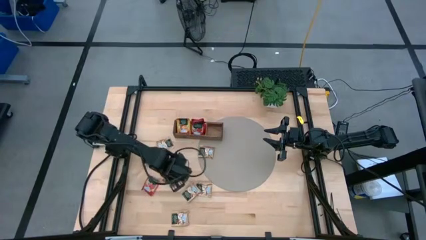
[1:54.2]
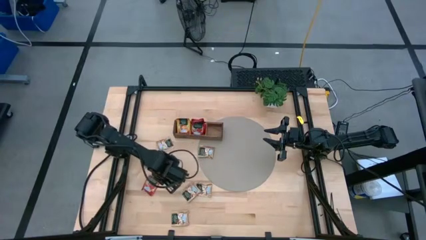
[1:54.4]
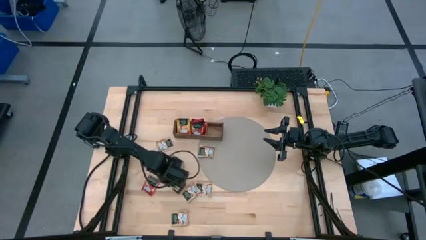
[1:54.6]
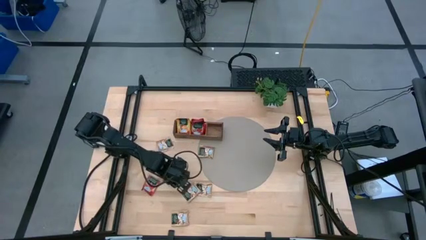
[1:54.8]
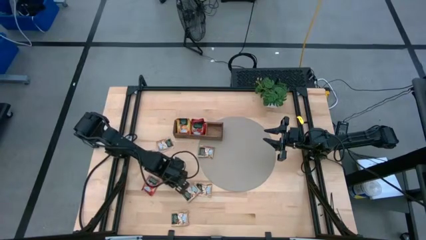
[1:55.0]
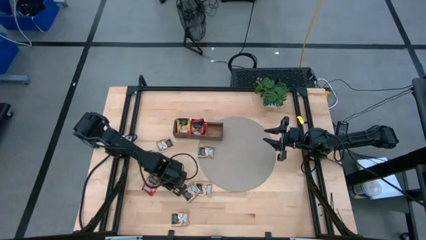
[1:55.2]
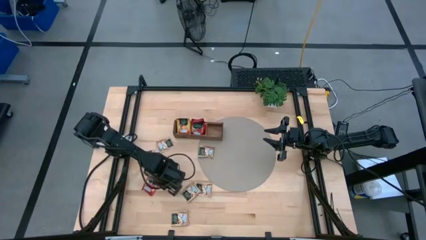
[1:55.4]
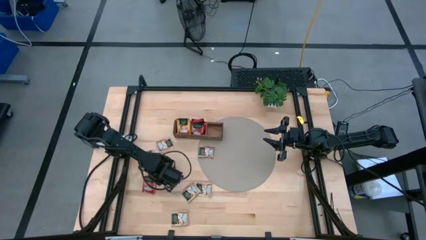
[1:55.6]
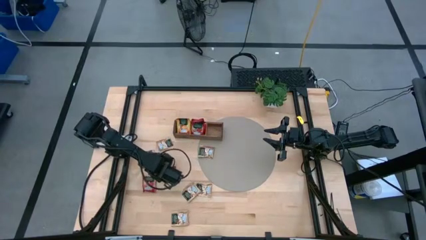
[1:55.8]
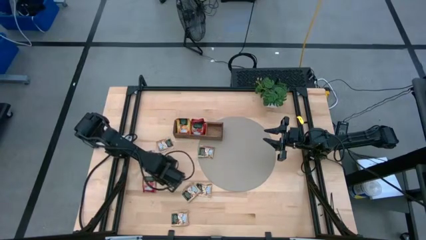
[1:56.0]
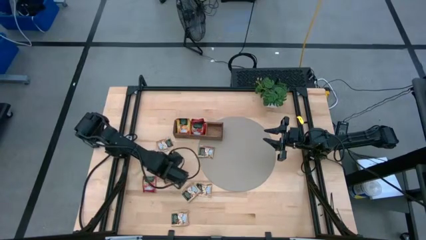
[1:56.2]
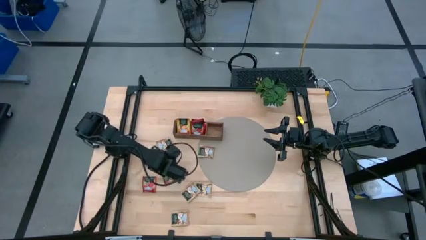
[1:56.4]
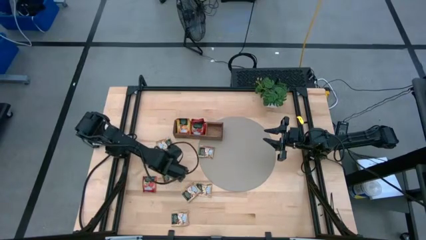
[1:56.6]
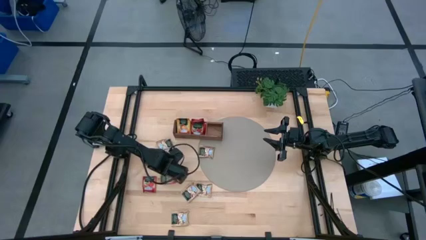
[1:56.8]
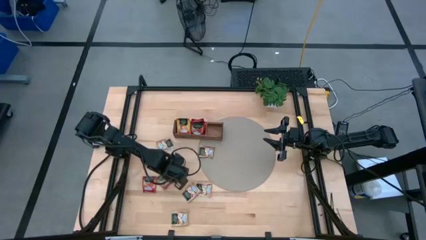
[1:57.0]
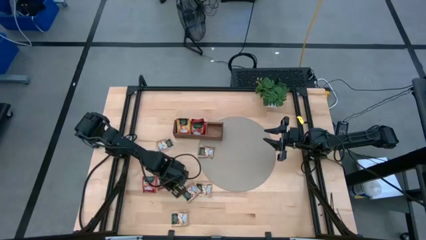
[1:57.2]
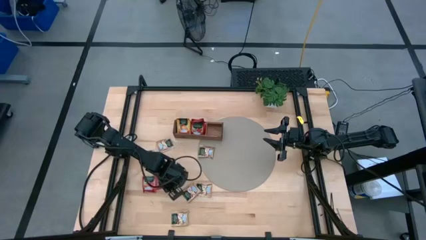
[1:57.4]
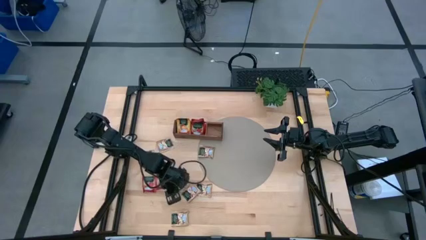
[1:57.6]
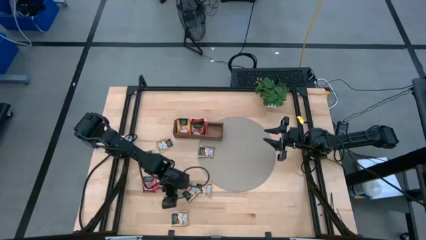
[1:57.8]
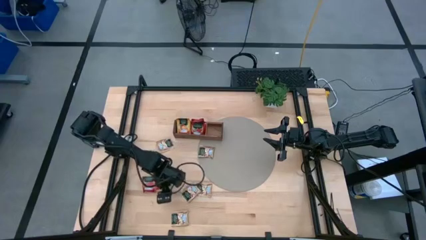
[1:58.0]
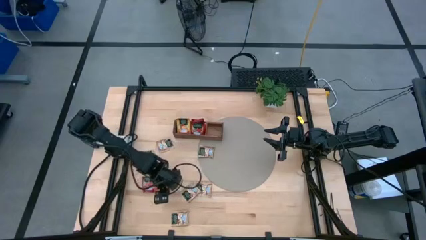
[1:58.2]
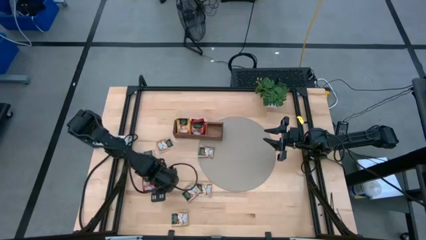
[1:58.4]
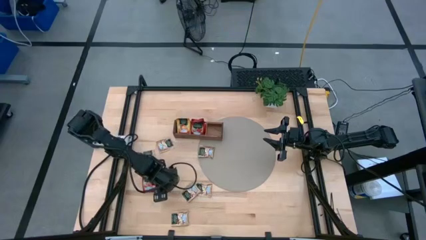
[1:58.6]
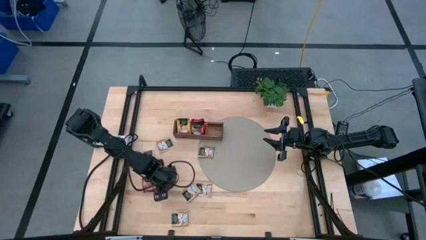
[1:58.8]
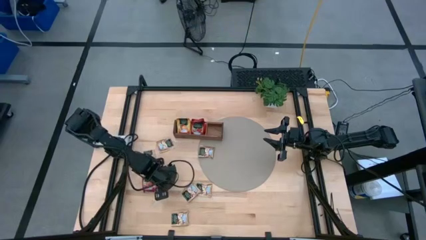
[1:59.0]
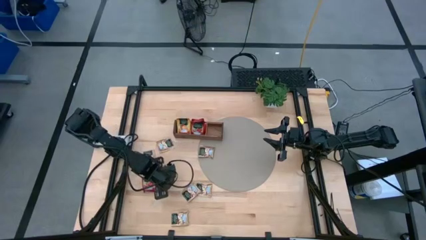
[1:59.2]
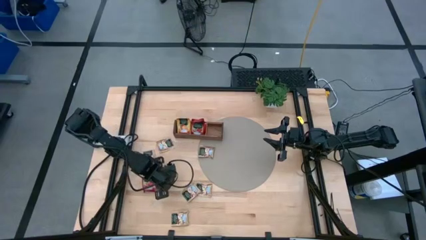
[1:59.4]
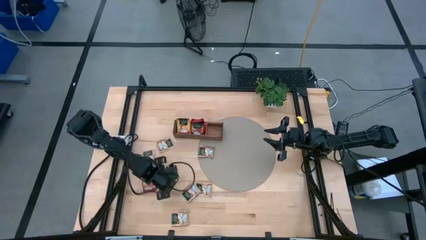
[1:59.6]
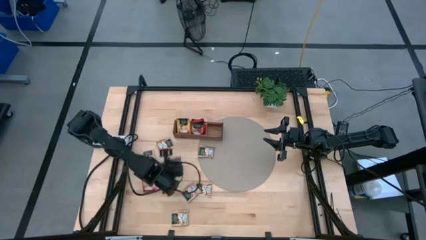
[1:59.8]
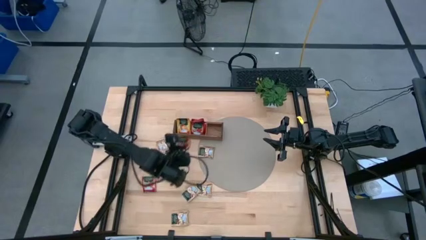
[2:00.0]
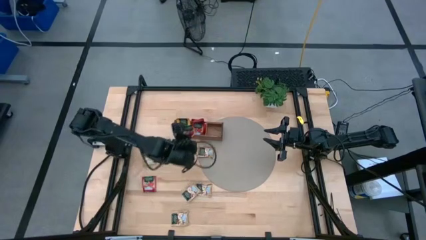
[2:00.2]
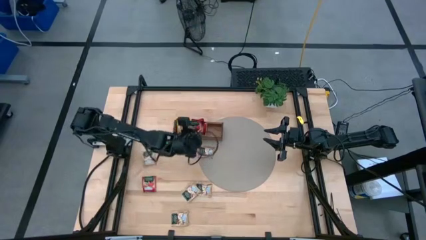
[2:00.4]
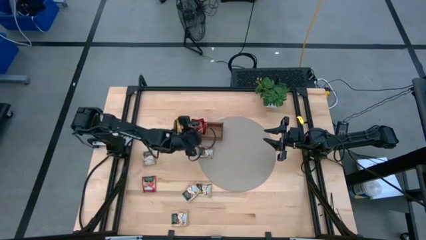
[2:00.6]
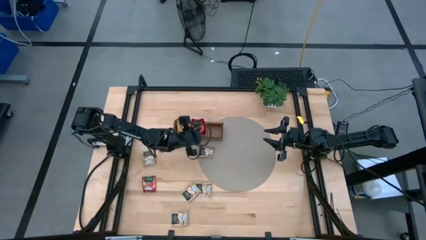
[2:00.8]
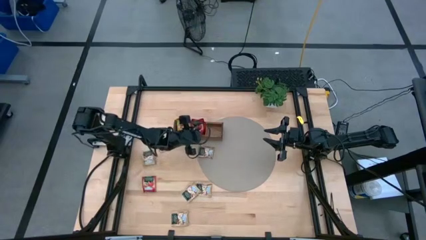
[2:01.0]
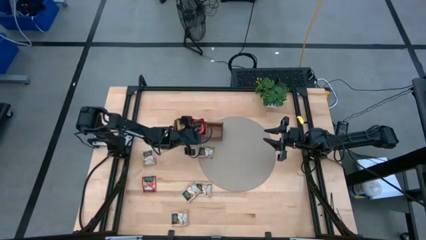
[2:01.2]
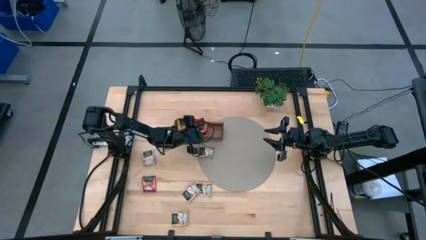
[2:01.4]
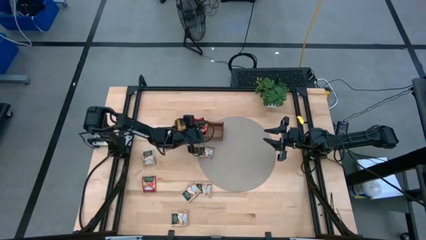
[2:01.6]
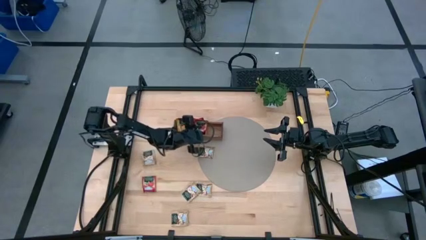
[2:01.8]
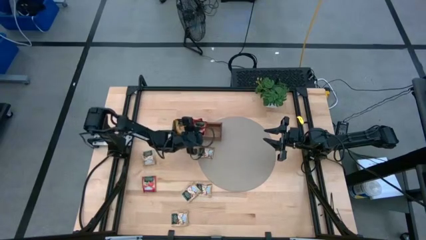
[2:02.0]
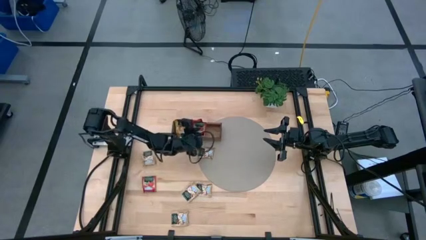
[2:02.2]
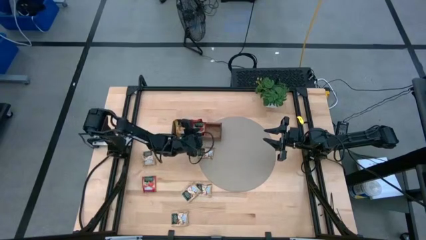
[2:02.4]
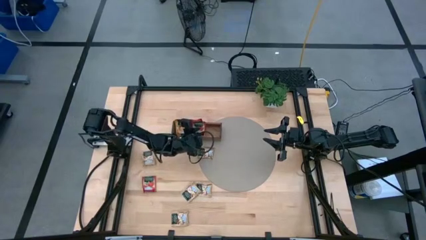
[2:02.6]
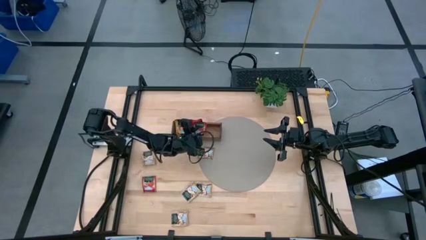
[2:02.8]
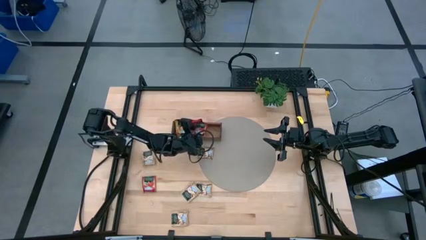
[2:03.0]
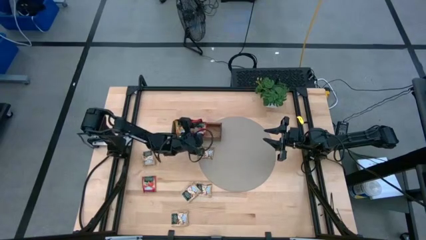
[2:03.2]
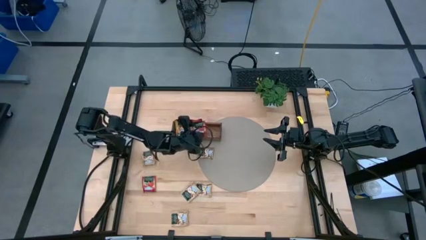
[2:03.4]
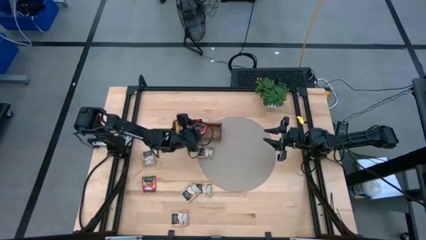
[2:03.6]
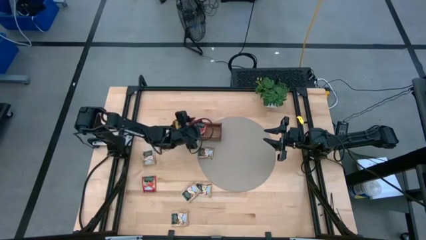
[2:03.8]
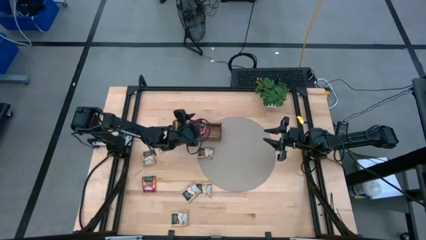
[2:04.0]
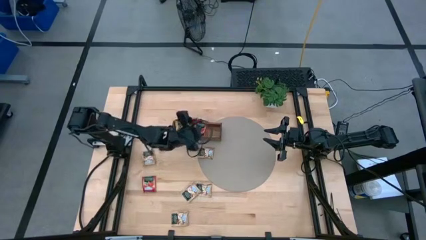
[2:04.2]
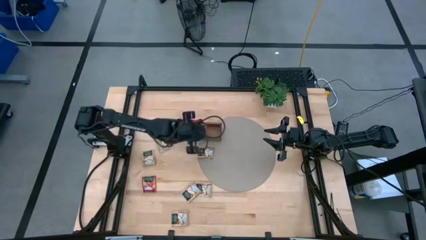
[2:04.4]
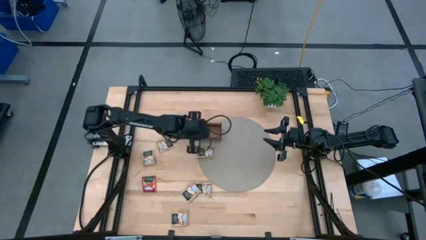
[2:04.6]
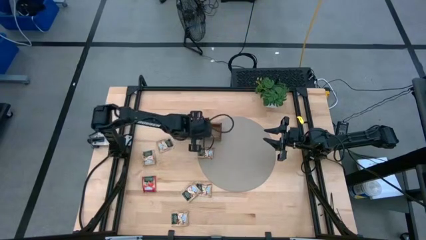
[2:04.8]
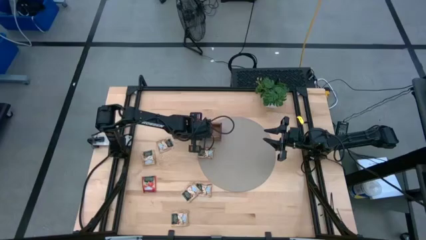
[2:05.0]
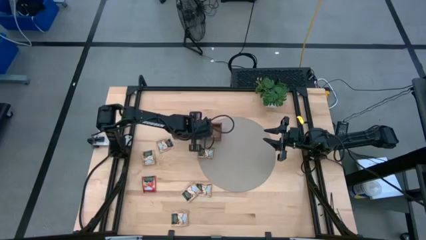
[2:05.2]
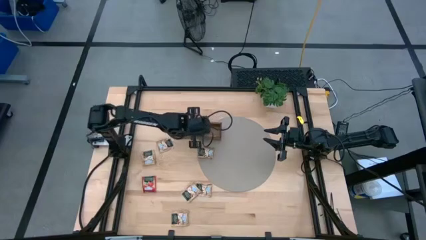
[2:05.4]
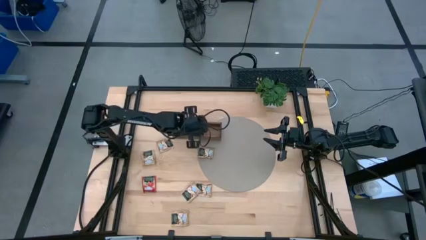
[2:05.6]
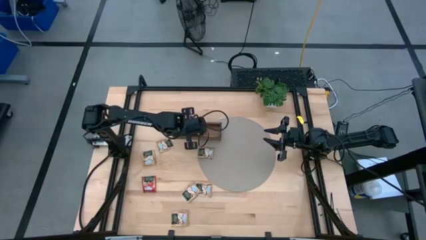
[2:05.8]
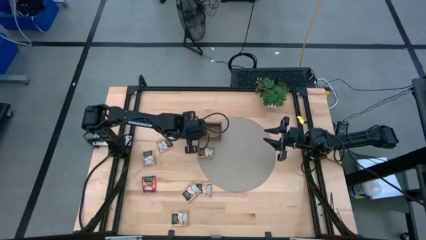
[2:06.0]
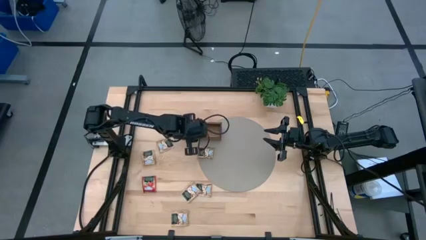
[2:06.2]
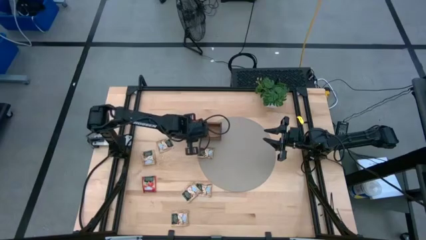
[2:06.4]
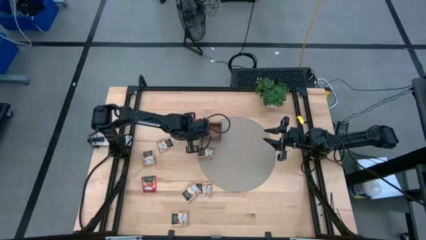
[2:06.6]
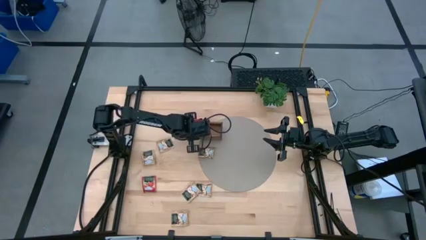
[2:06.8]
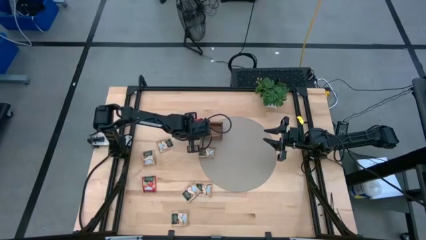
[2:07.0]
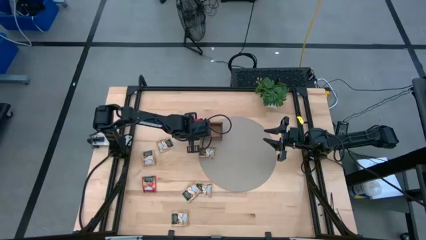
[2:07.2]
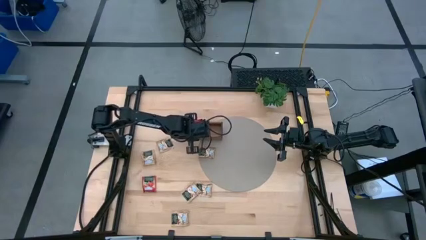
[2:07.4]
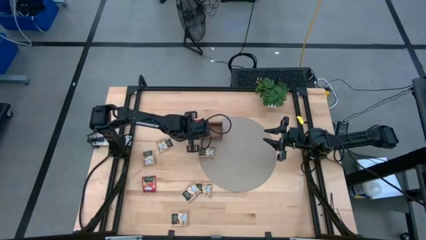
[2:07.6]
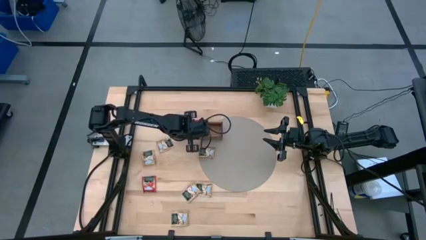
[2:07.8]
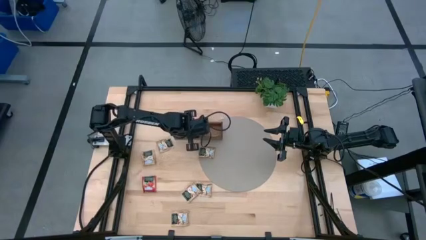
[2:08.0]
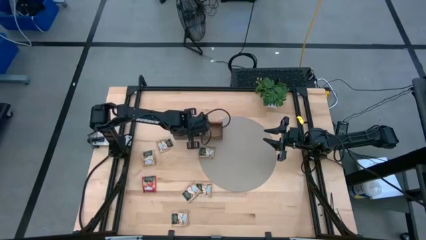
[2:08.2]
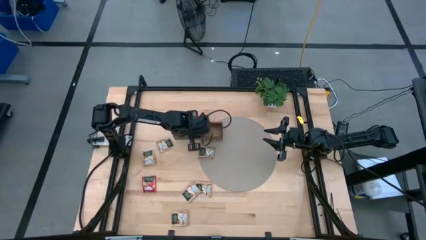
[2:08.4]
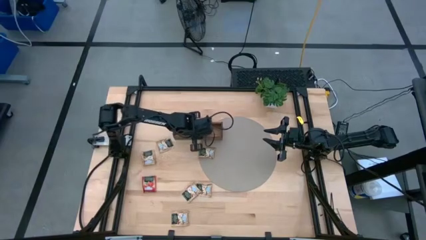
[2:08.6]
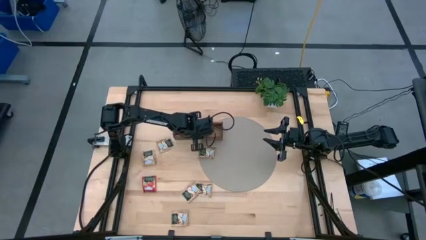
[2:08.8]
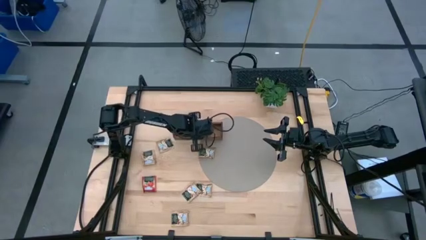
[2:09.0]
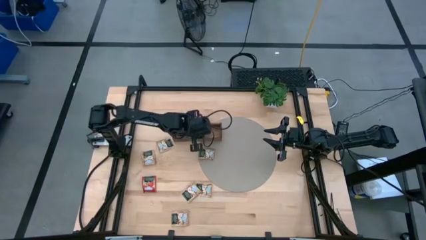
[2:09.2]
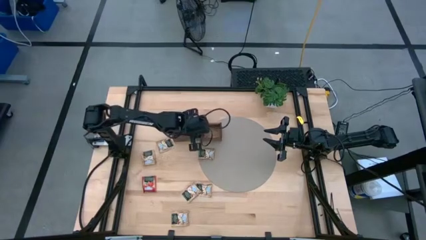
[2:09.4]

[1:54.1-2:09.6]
Task: Pick & Place Tea
Put the red tea bag into the middle section of the wooden organizer
